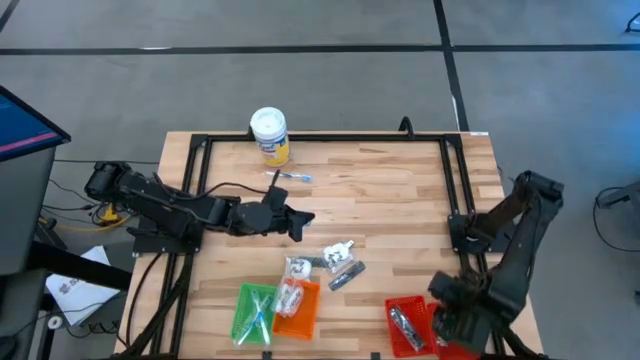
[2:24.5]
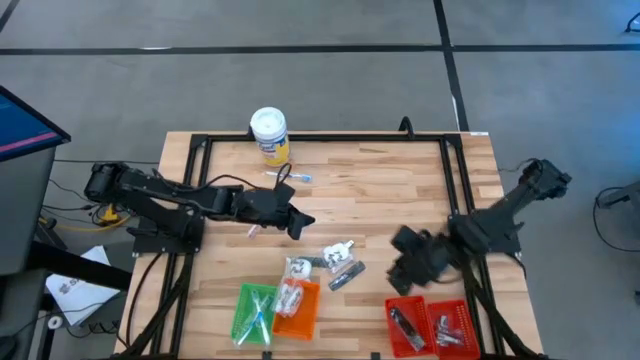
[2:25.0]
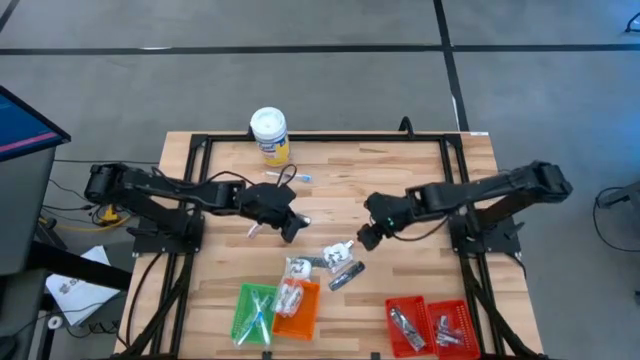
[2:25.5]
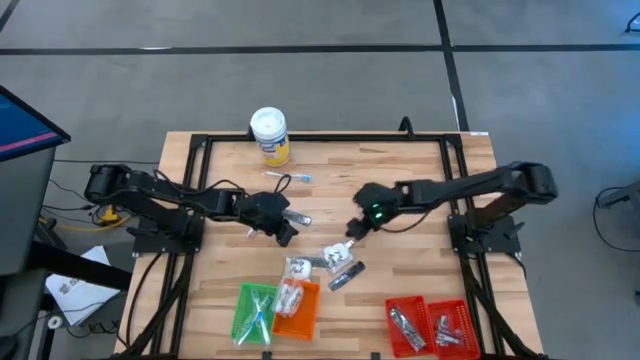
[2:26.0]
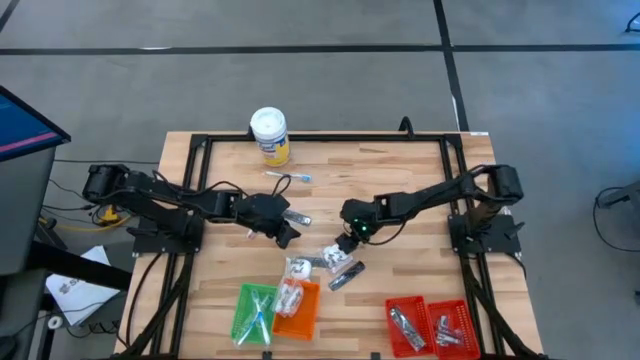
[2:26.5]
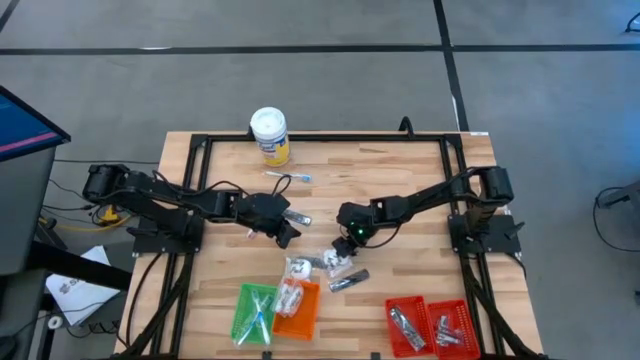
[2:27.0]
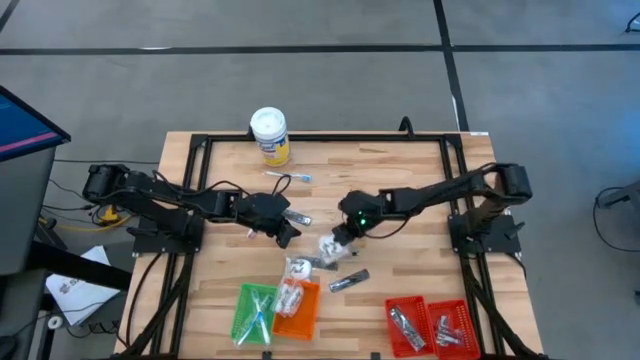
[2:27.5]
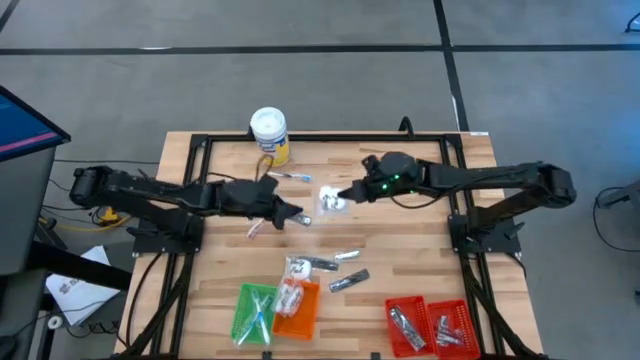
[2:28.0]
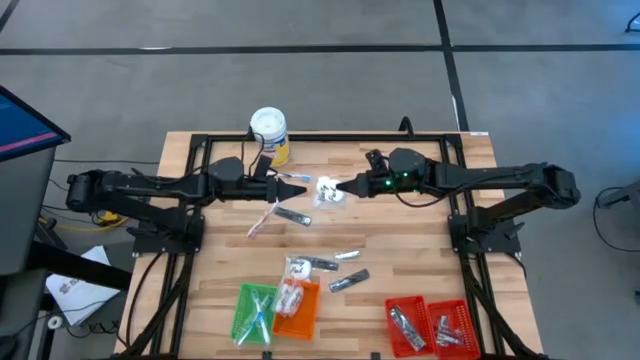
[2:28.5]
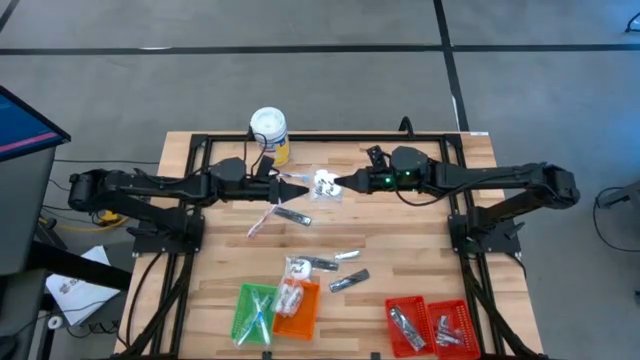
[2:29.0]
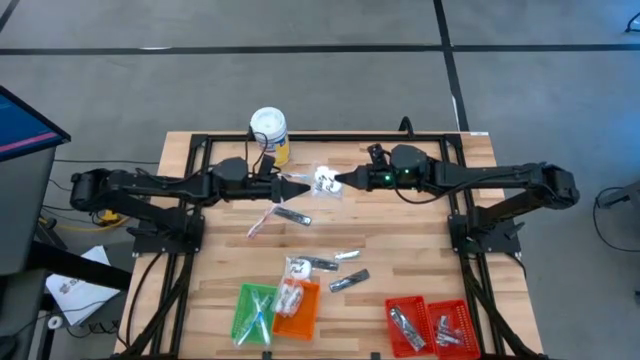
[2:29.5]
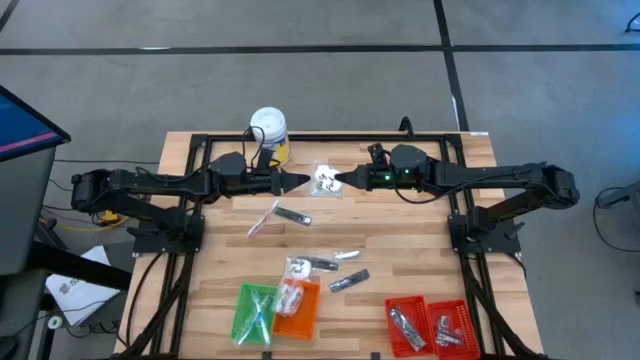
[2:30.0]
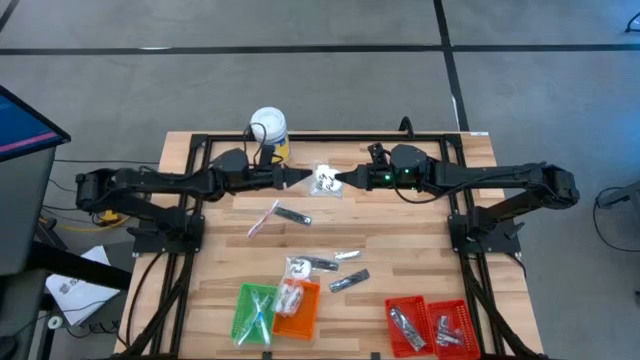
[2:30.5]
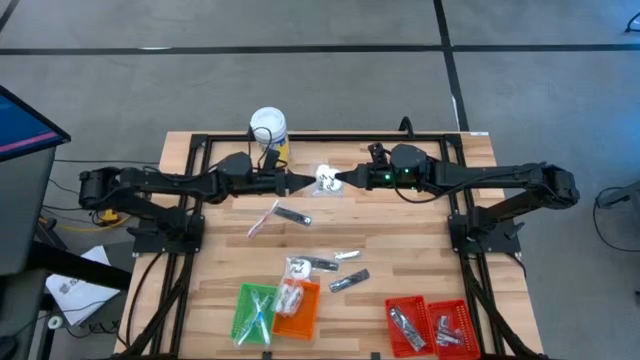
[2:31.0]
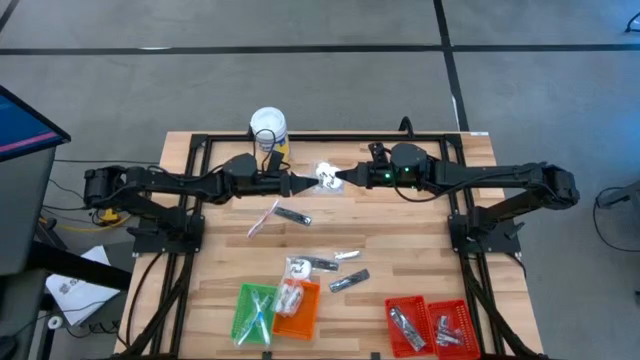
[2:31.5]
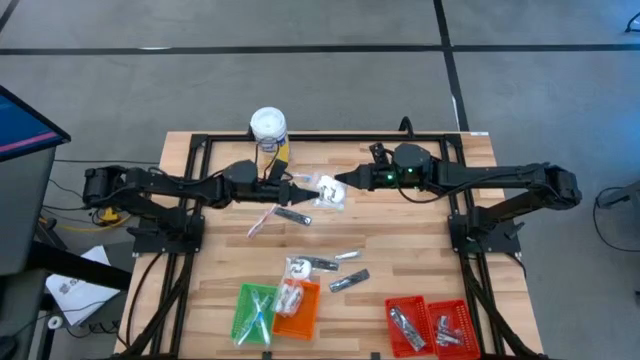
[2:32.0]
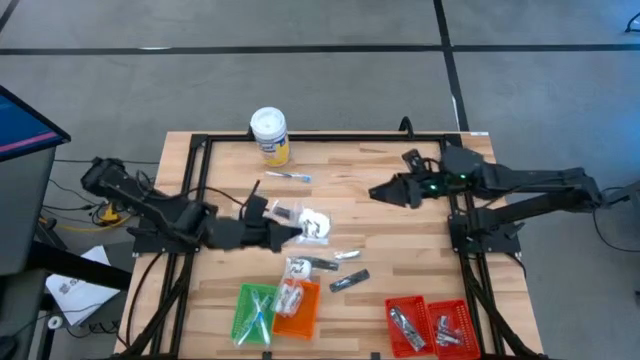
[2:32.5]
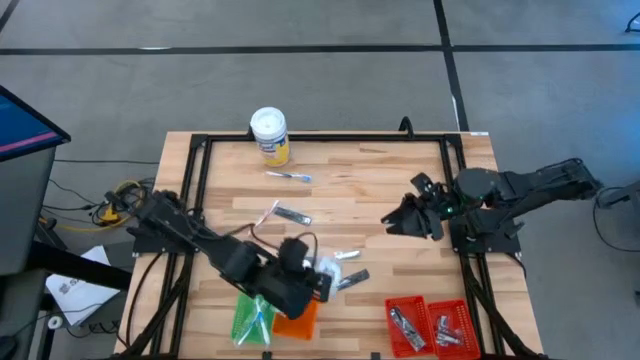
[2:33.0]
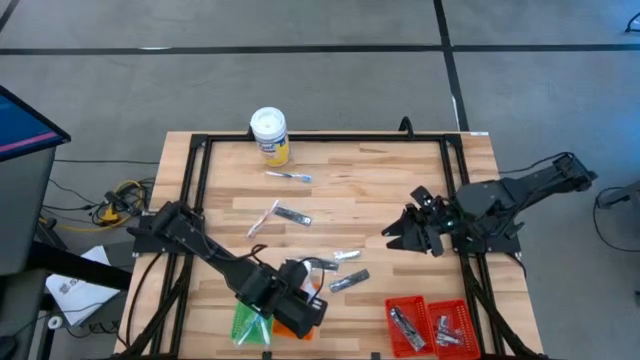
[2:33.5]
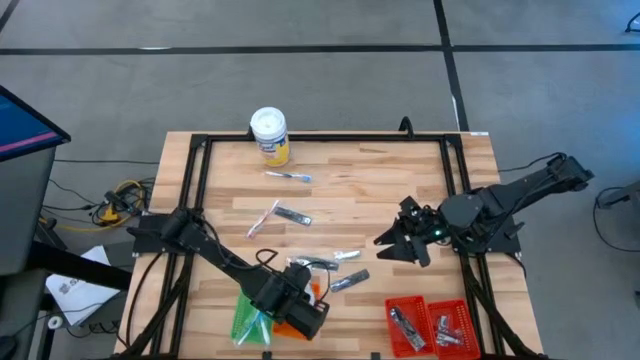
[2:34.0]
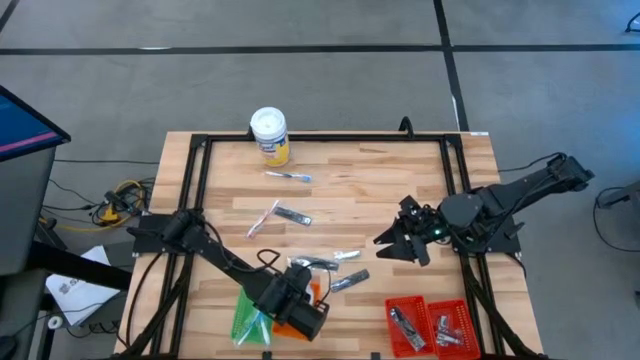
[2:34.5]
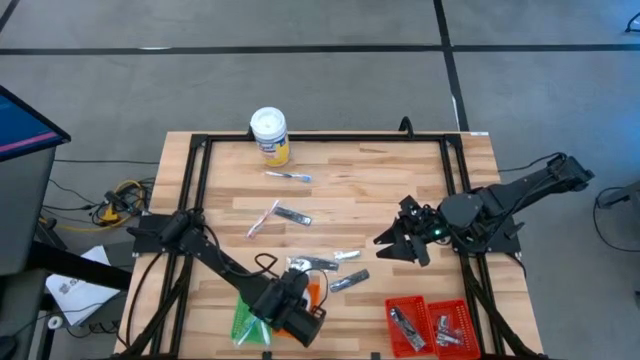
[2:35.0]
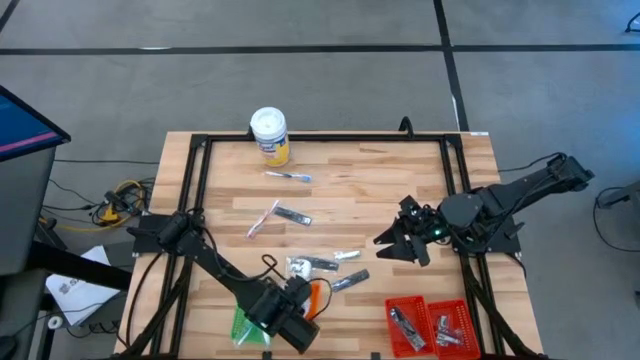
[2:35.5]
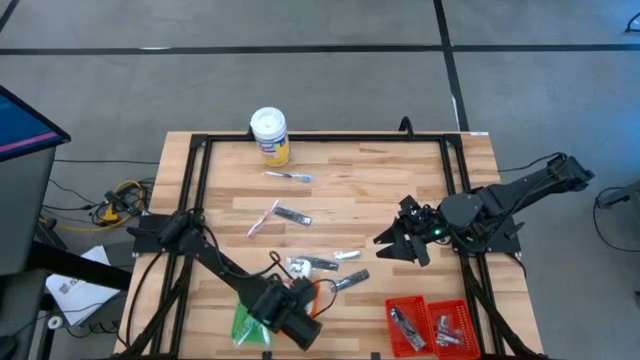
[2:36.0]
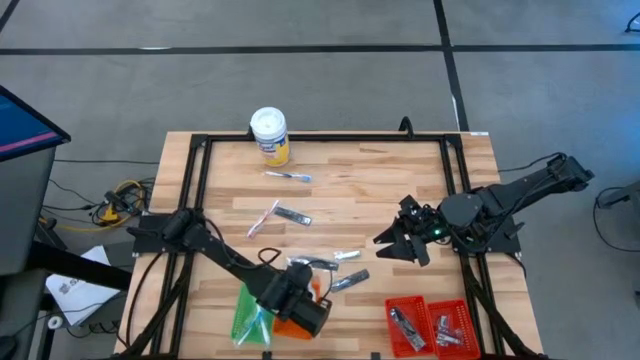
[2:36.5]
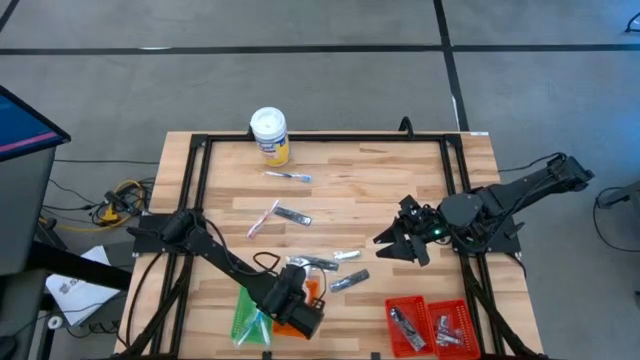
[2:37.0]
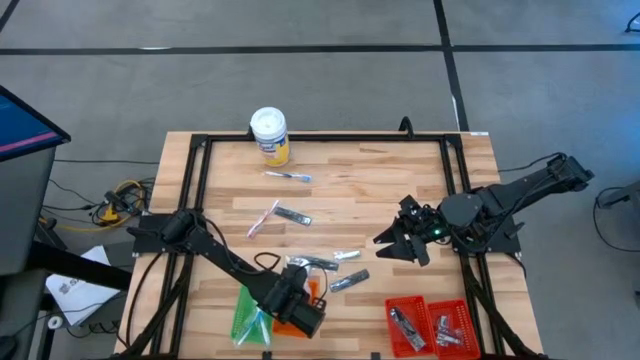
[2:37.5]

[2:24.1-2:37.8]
Task: Pick & Place Travel size toiletries
Put the white vanity pack into the orange basket

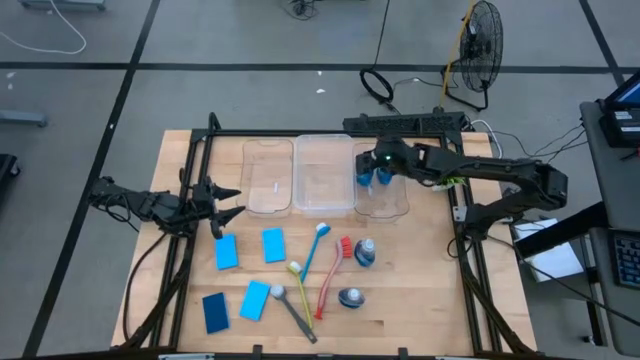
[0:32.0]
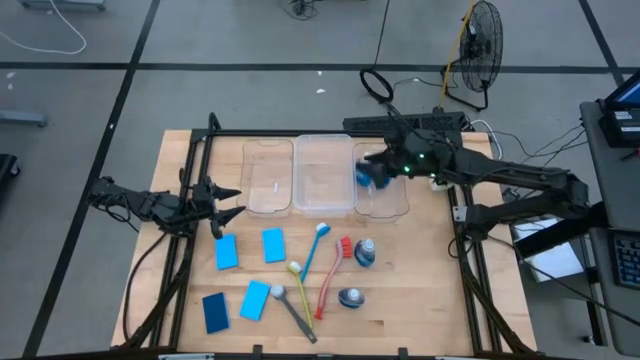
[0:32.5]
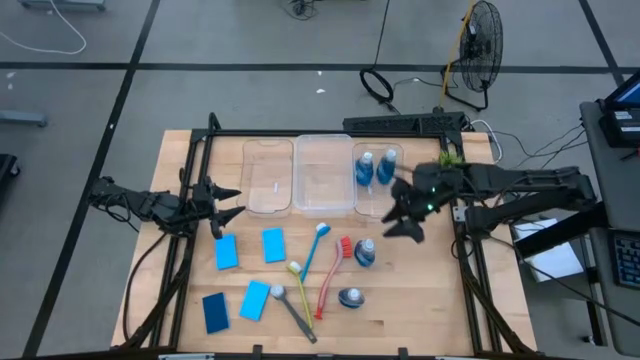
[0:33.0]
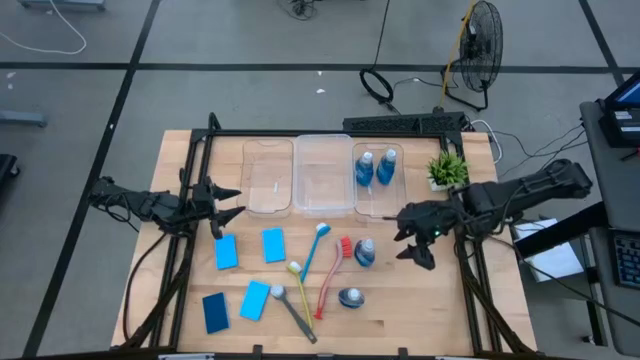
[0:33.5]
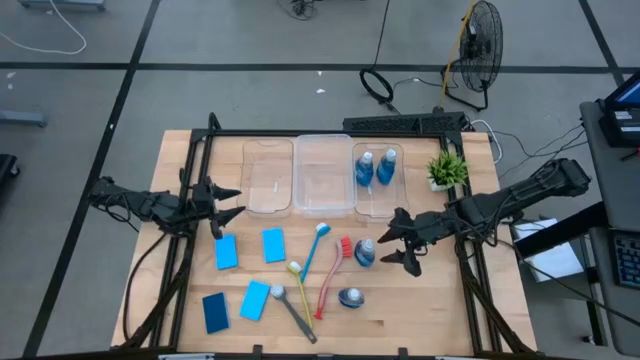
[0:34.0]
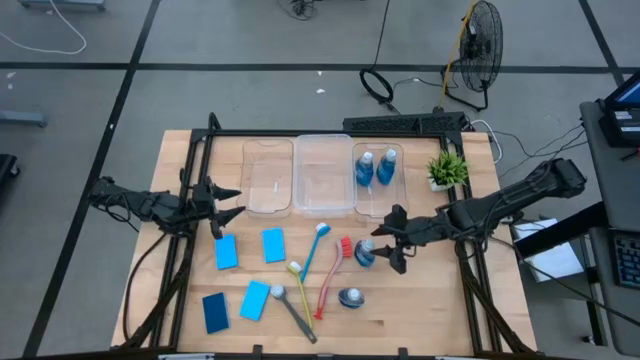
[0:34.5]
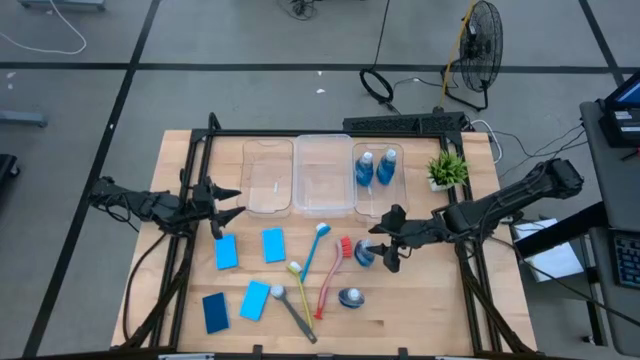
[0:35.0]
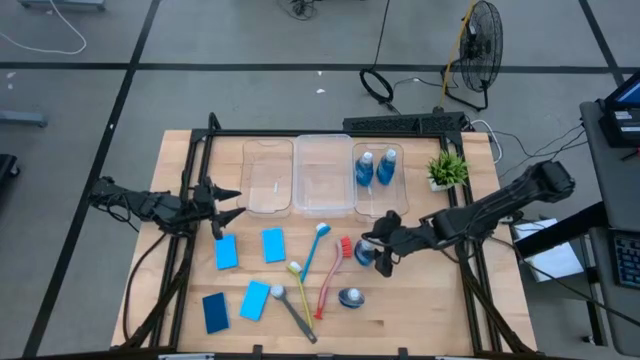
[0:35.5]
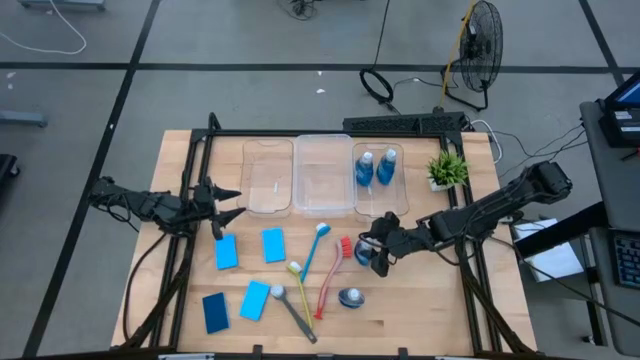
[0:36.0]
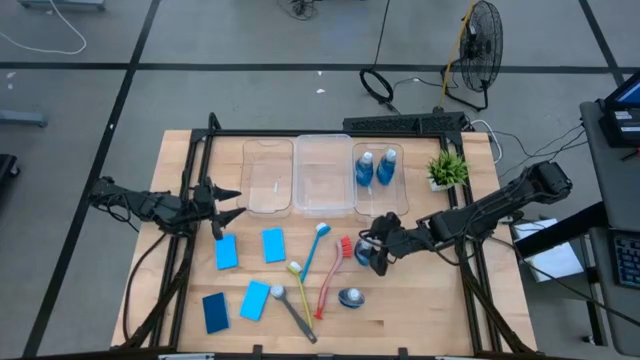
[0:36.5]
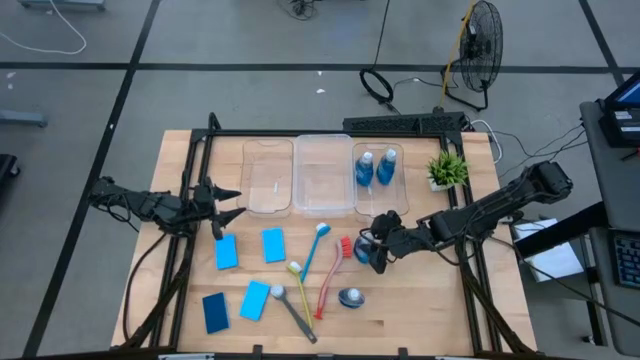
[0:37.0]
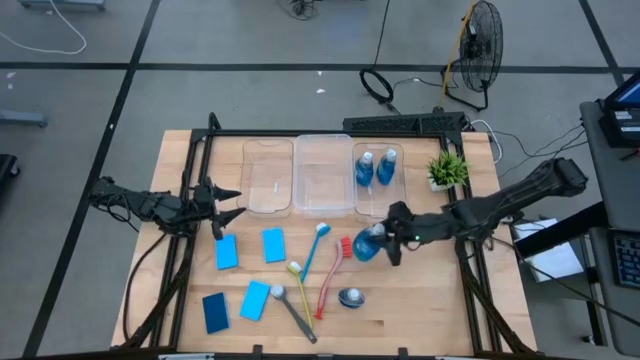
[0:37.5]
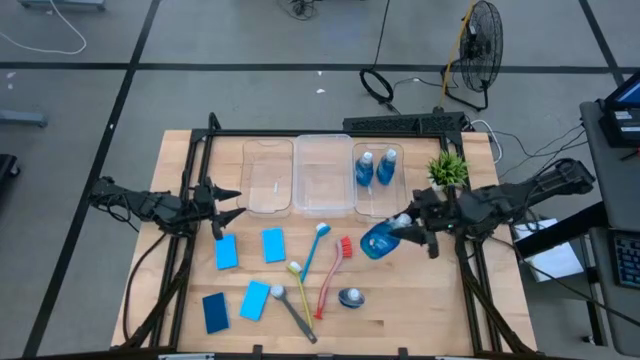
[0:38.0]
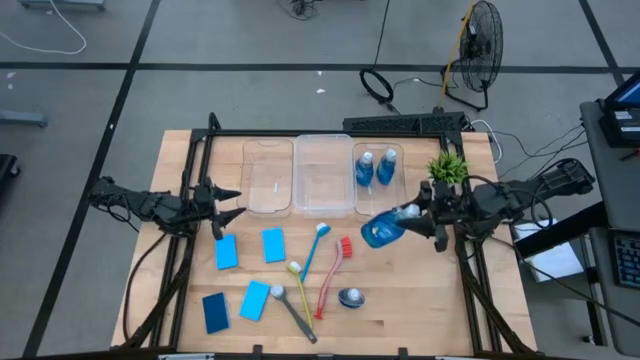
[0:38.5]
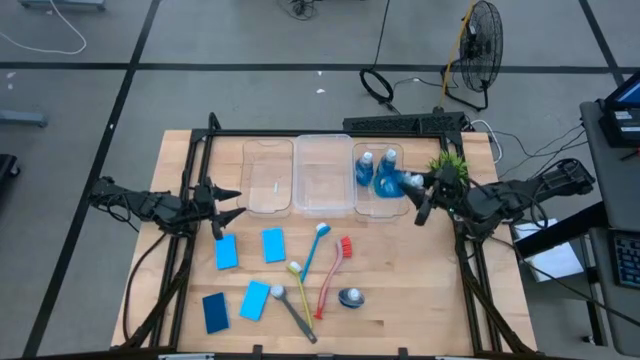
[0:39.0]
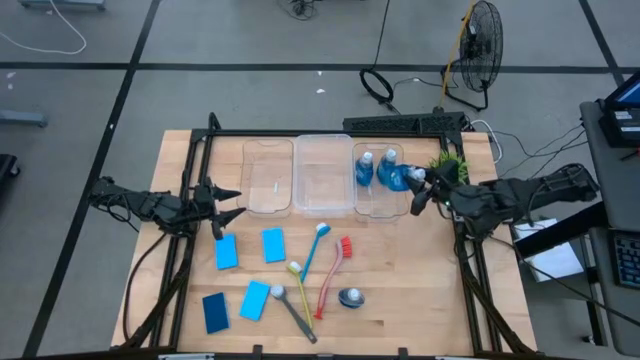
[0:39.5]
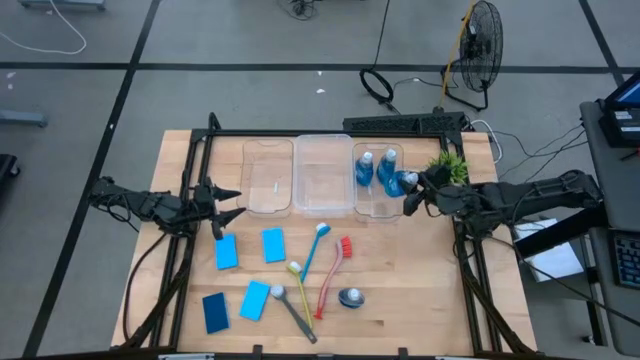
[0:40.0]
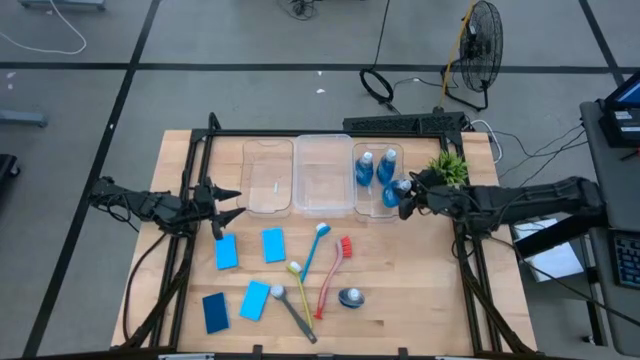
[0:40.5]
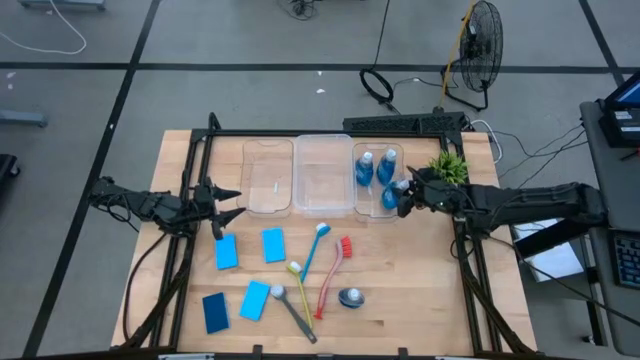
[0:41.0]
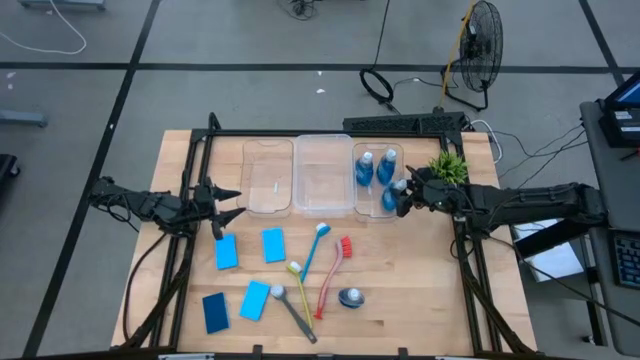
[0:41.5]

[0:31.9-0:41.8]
Task: Pick & Place Kitchen Sink Supplies
Put the blue dishwashing liquid bottle into the right transparent bin
